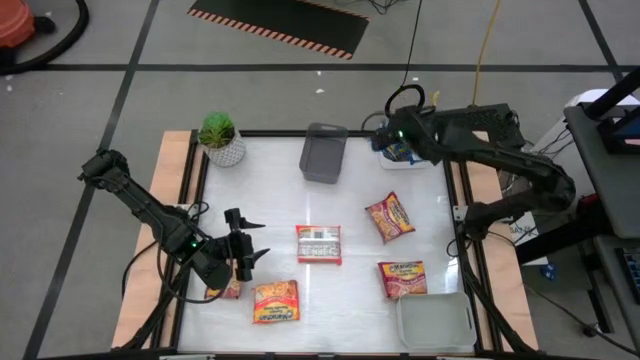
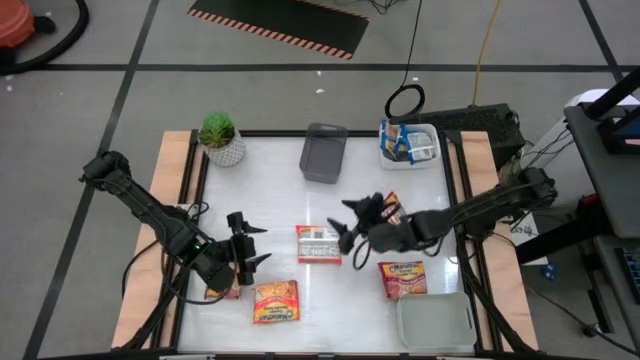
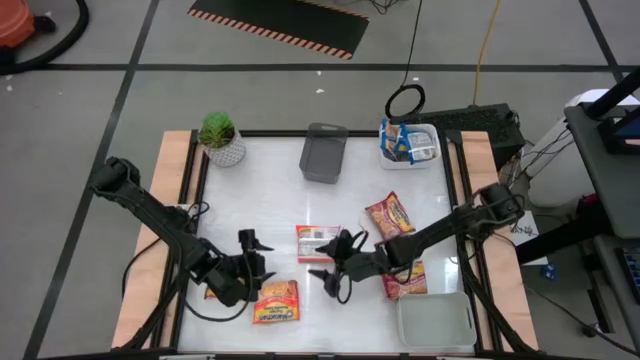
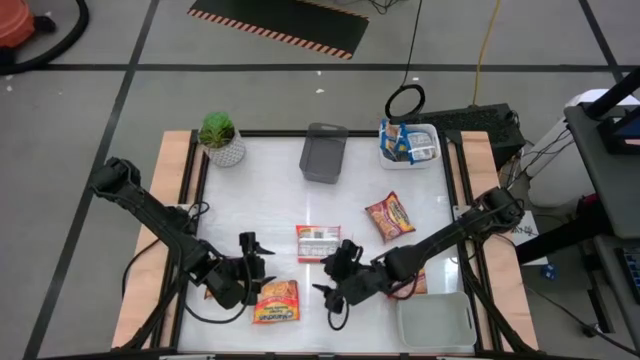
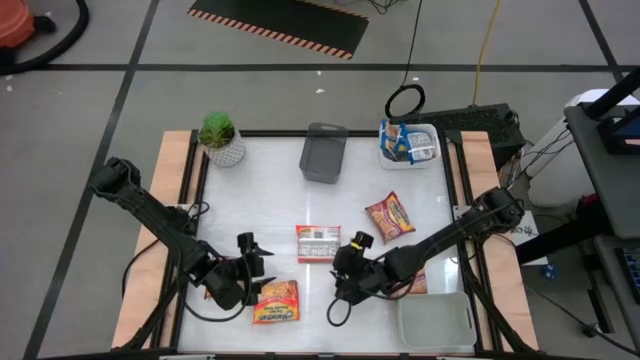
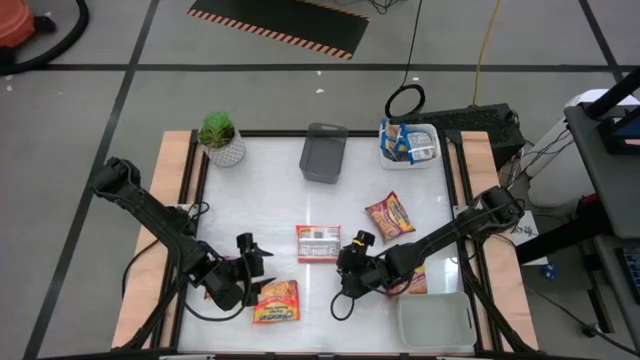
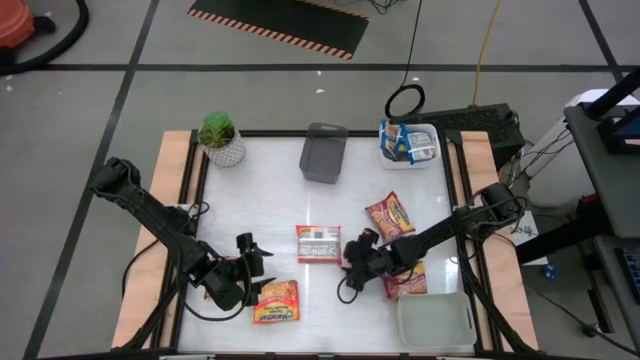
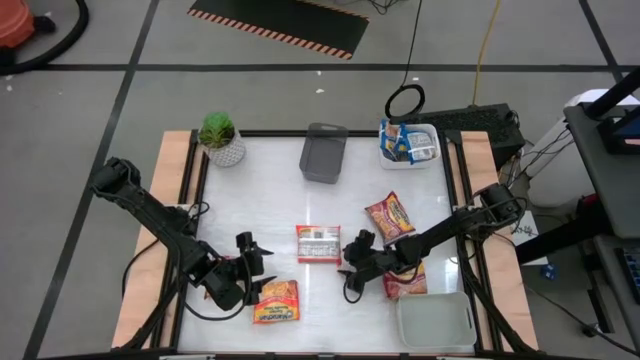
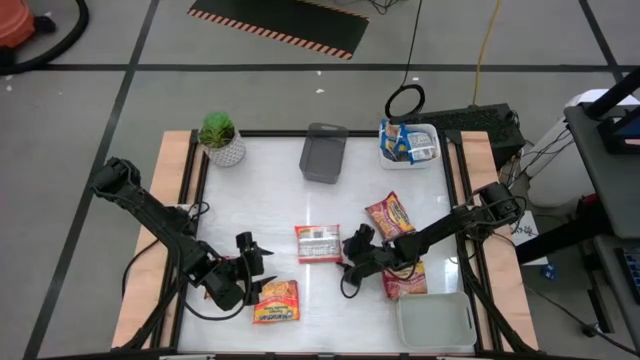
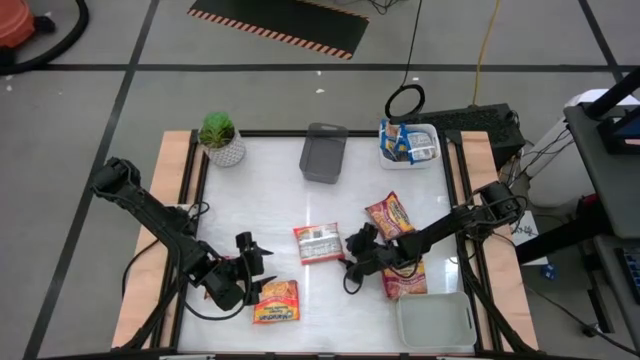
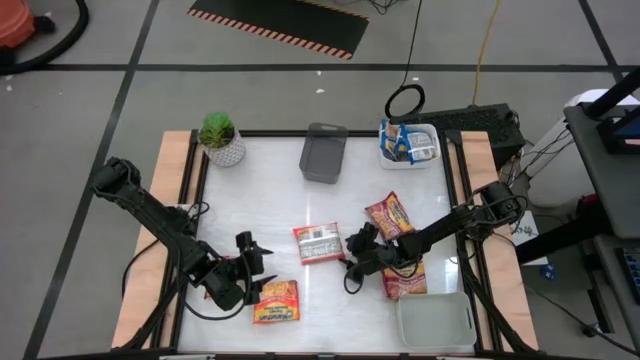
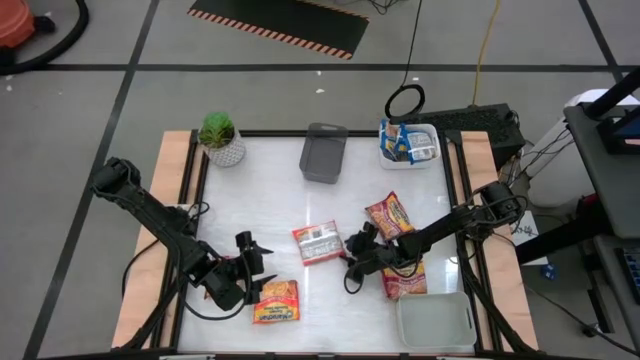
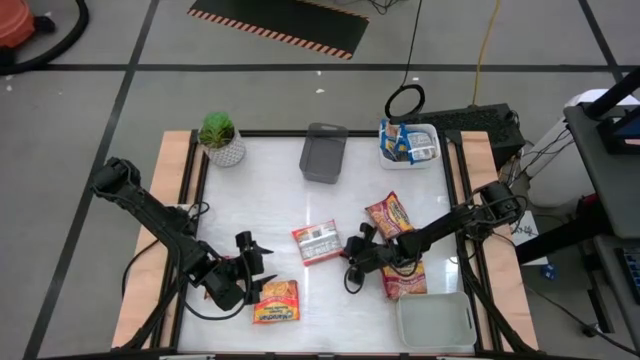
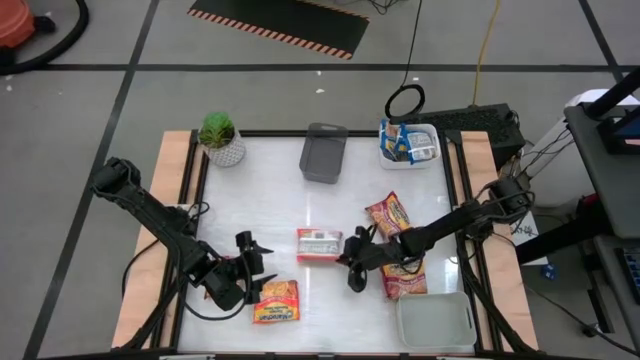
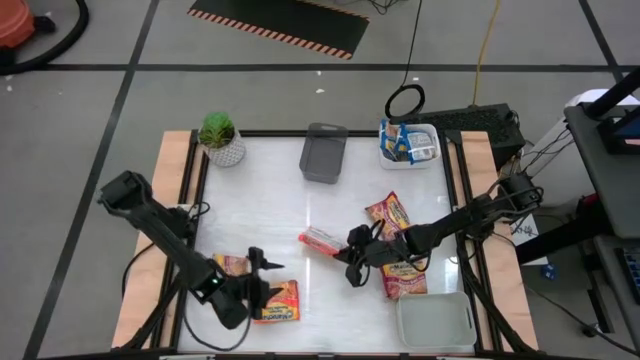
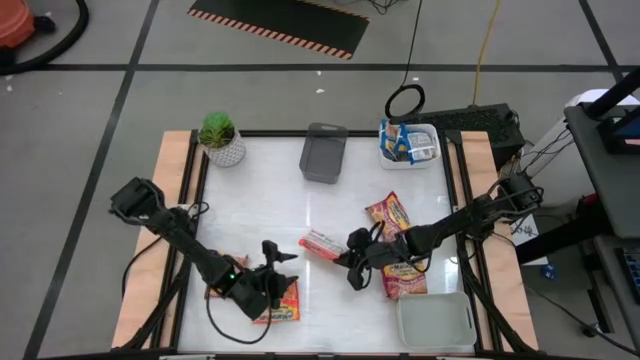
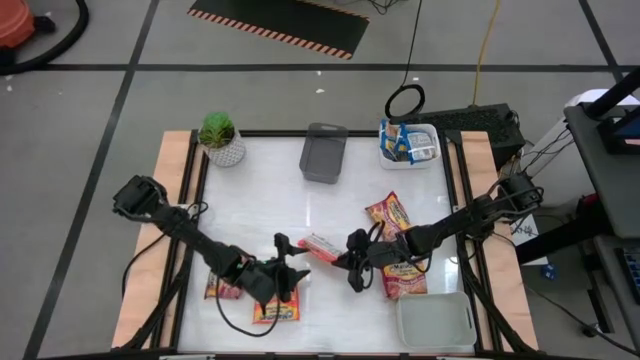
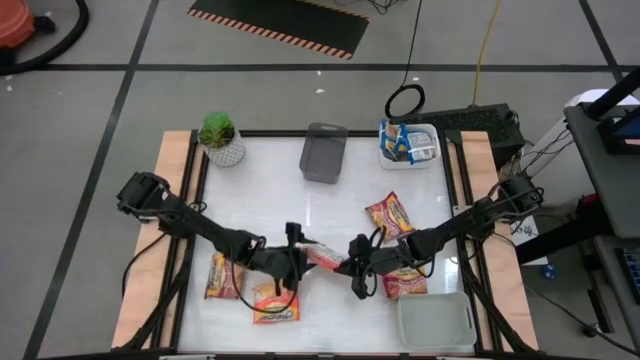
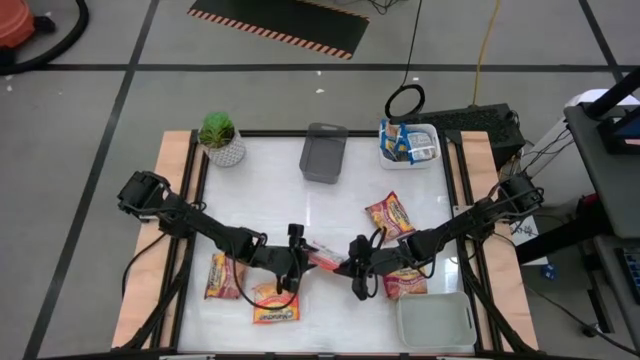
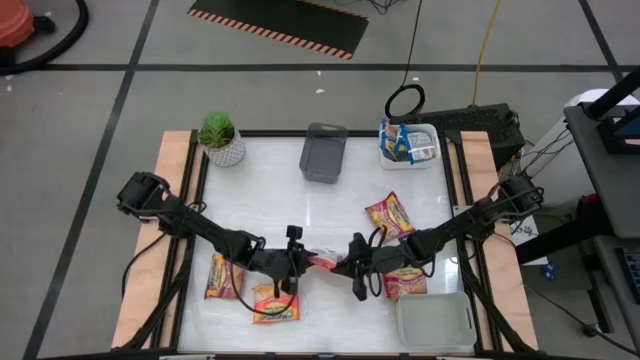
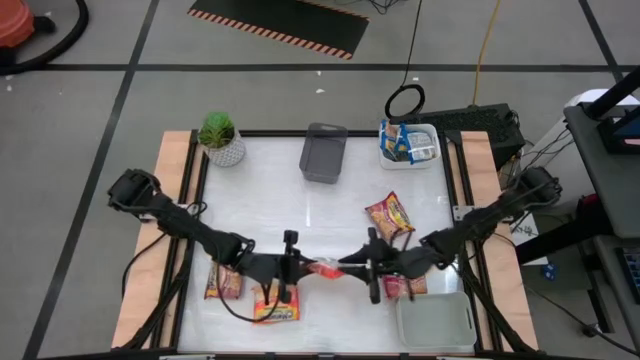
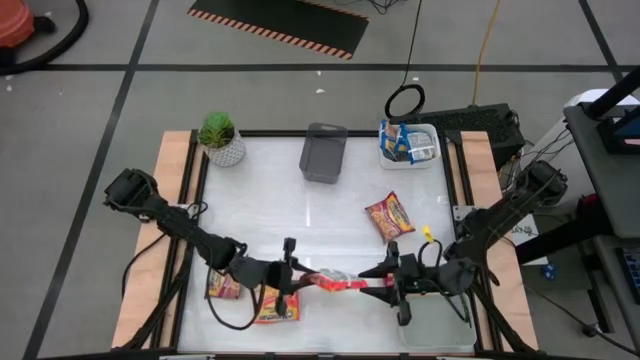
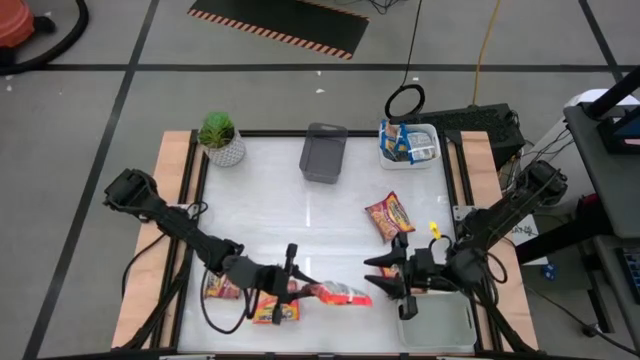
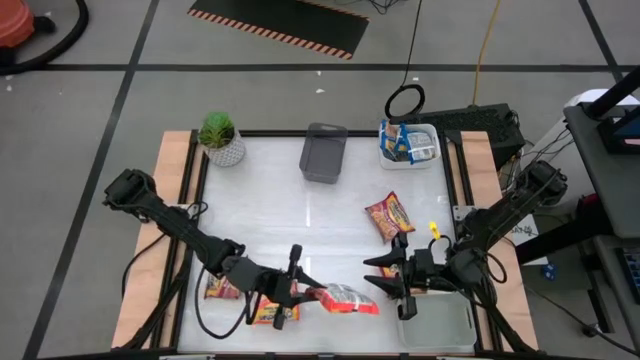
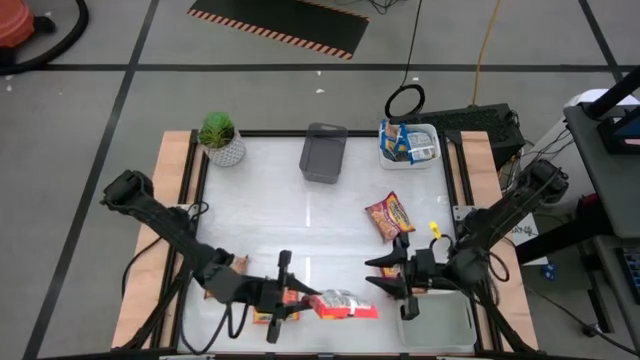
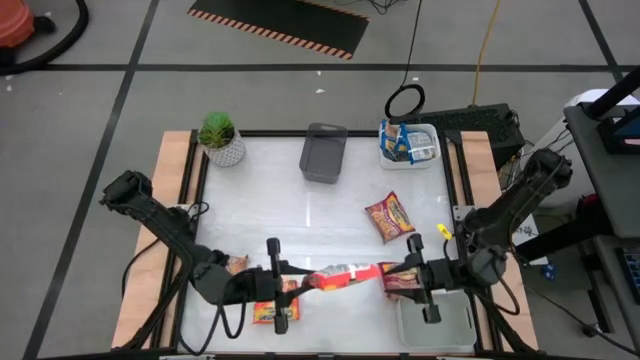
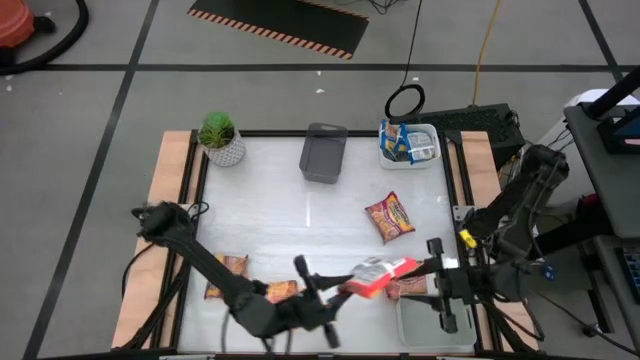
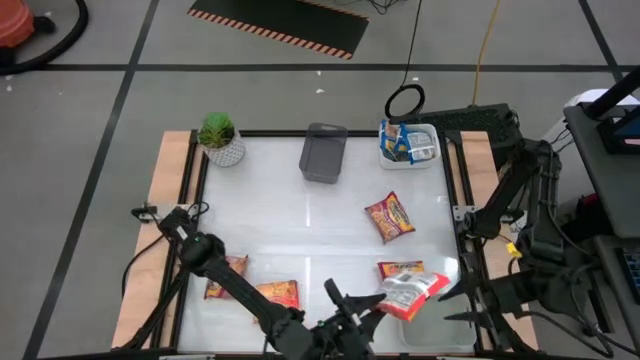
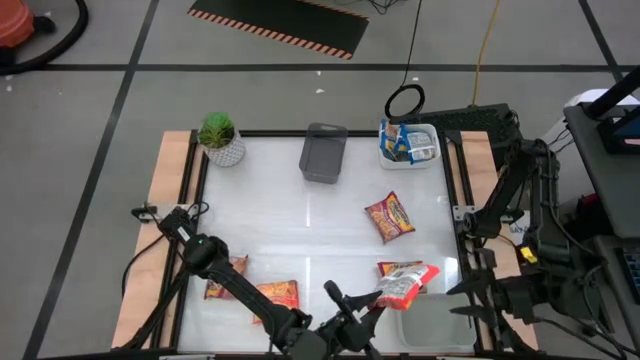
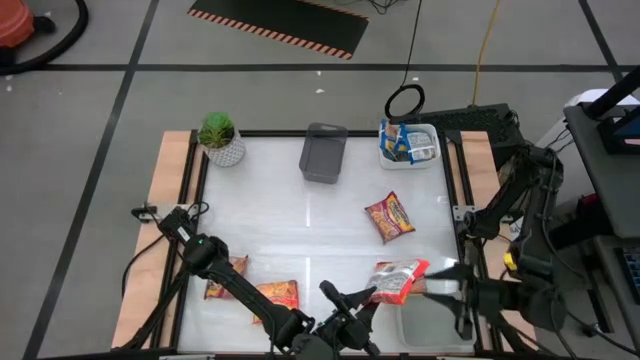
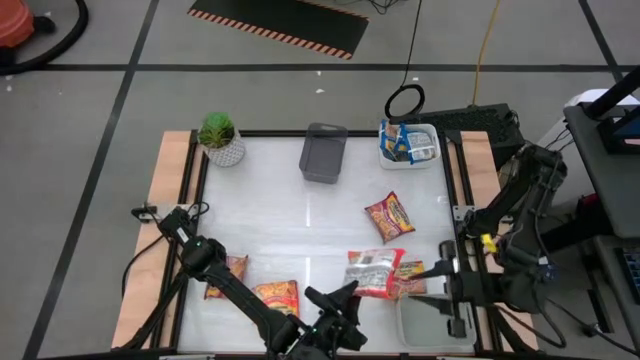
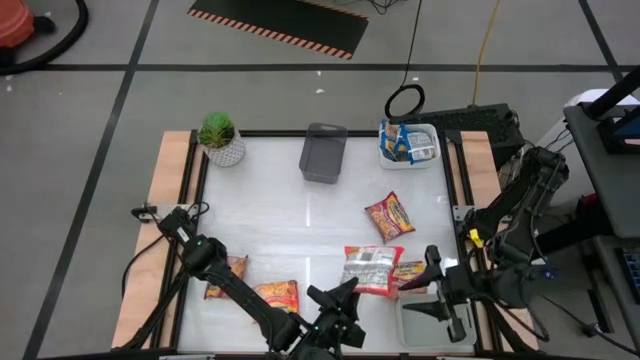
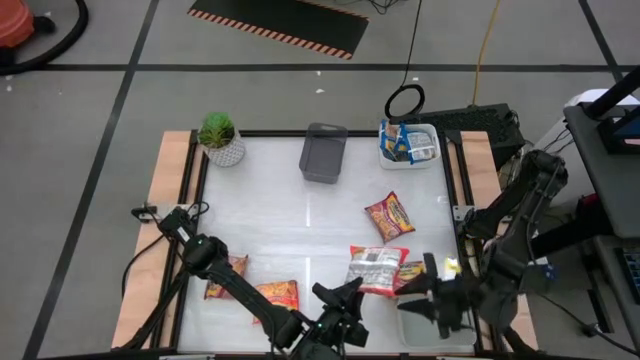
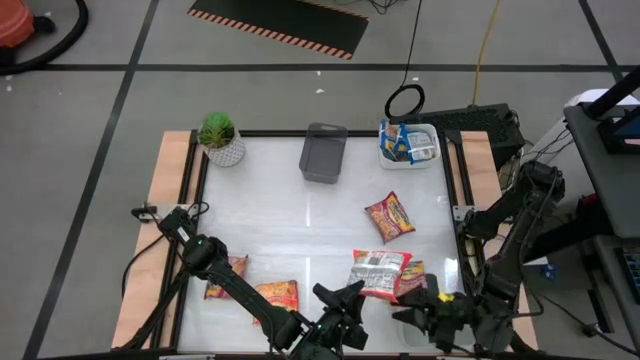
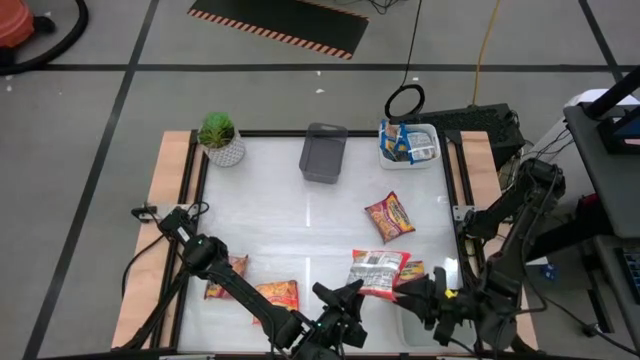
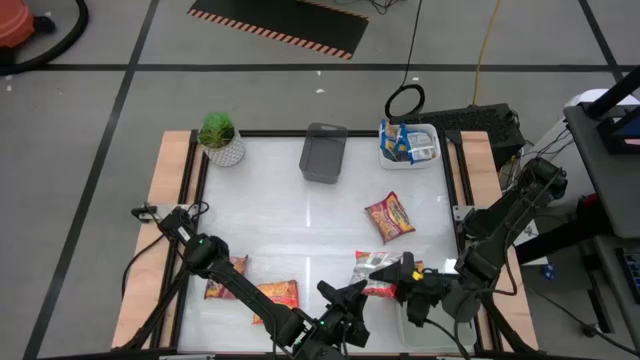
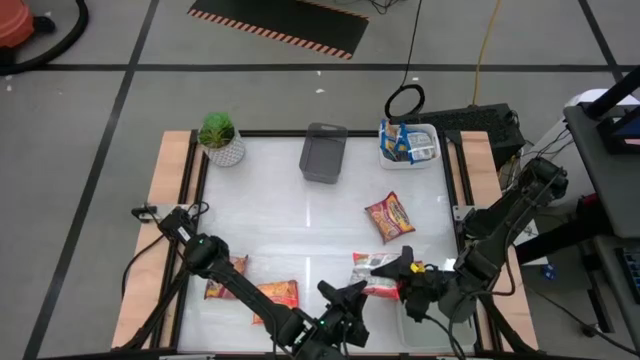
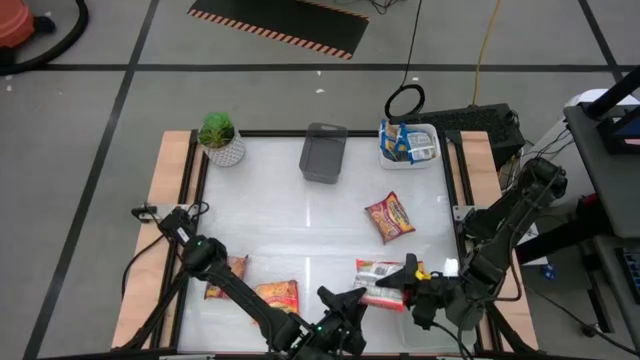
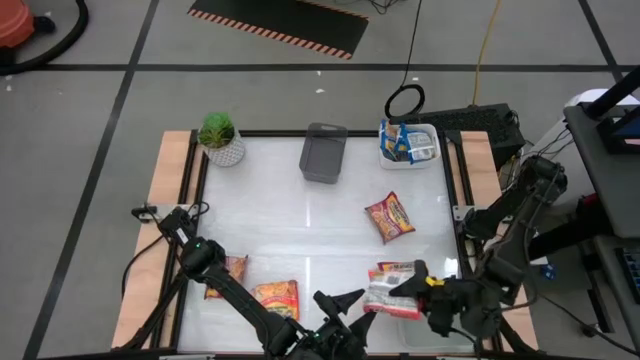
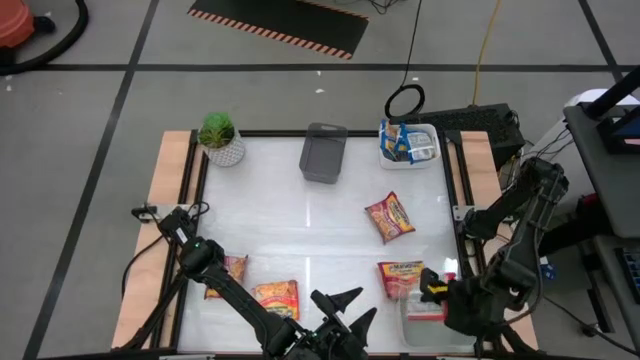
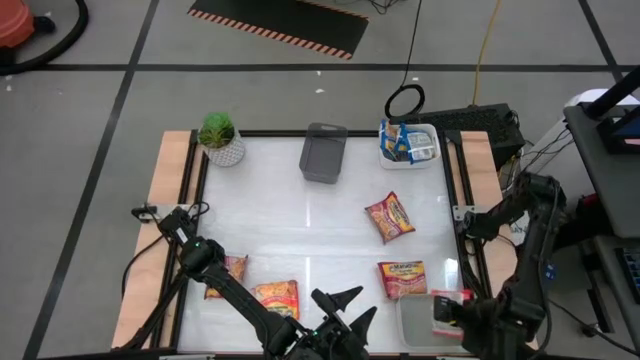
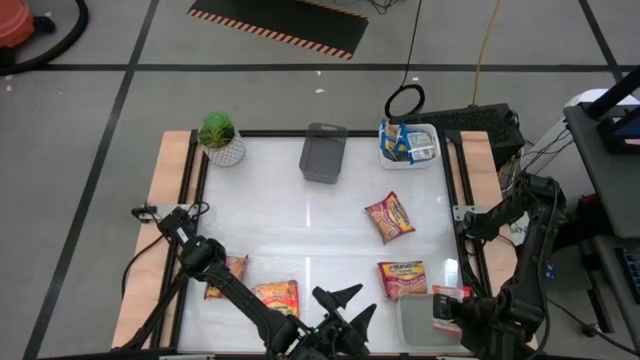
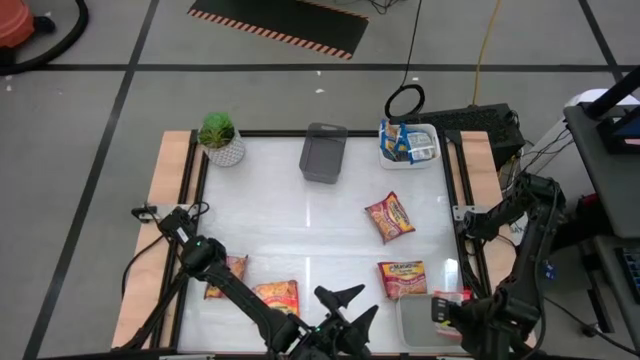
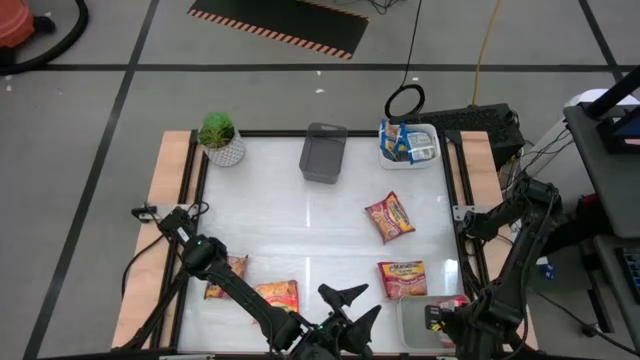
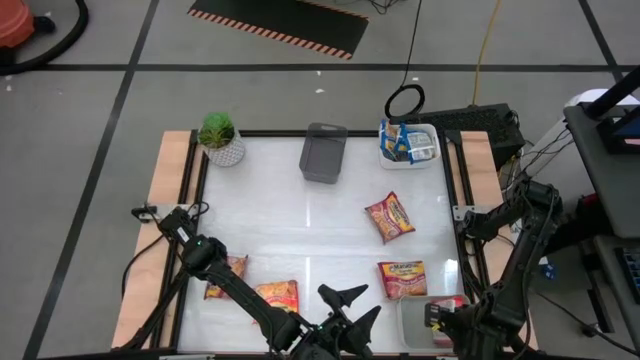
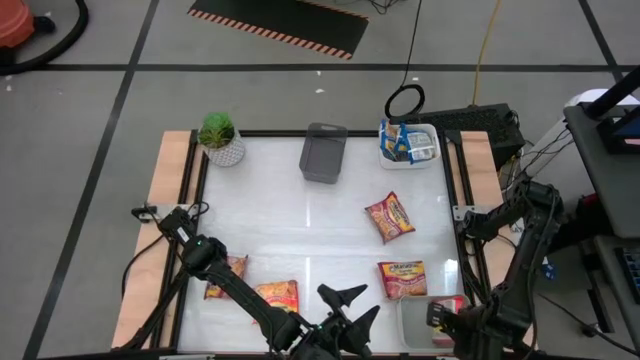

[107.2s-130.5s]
Task: Sort Maruchan noodles
Put the top orange noodle pack into the gray bin
